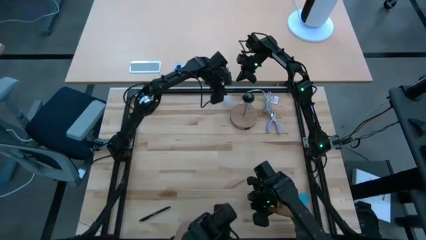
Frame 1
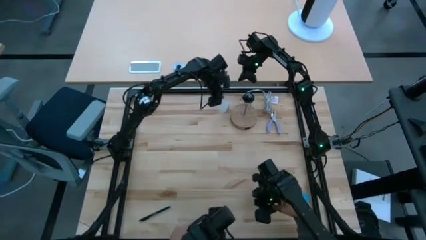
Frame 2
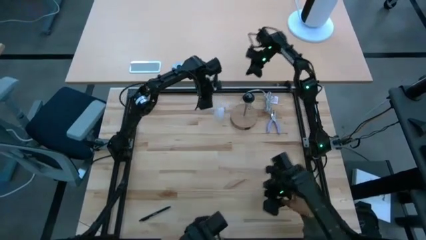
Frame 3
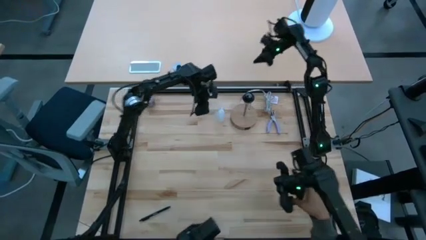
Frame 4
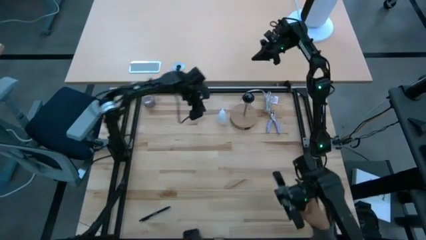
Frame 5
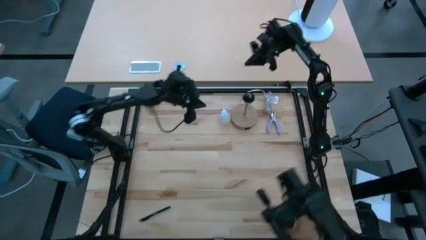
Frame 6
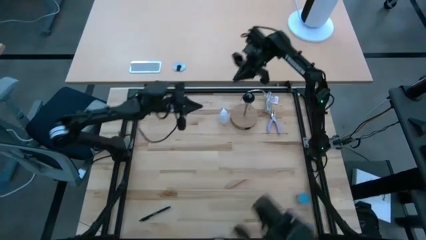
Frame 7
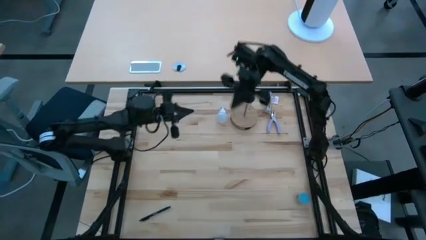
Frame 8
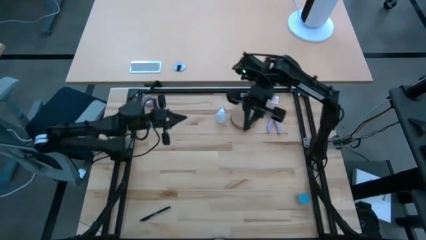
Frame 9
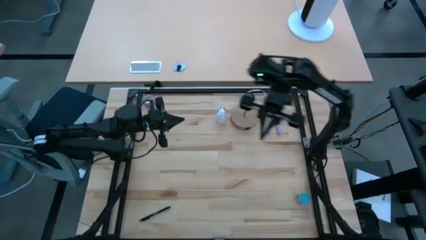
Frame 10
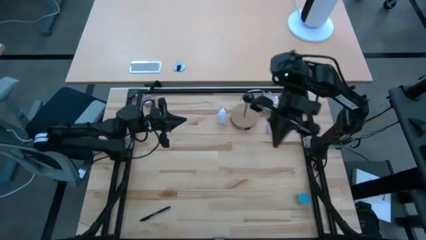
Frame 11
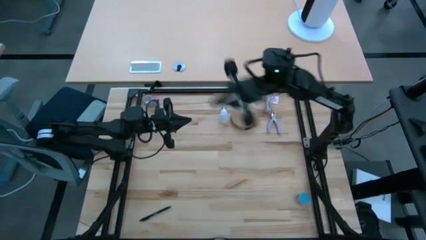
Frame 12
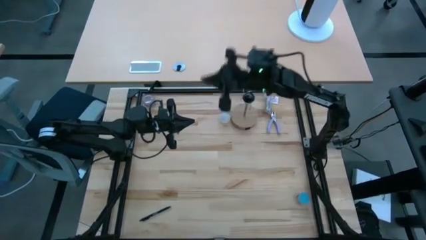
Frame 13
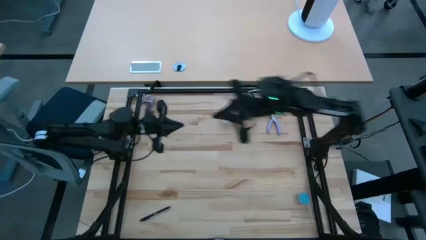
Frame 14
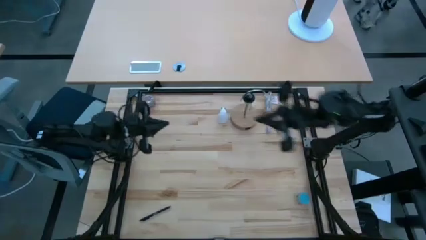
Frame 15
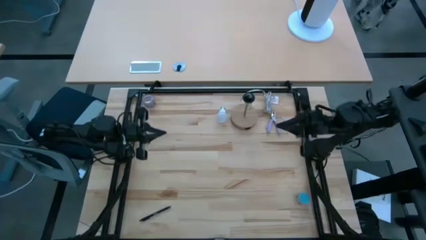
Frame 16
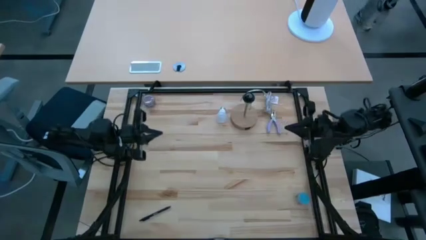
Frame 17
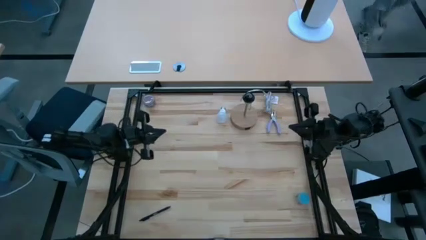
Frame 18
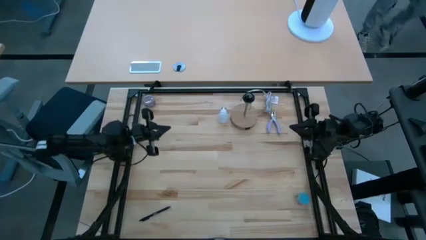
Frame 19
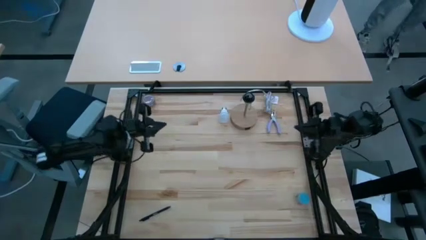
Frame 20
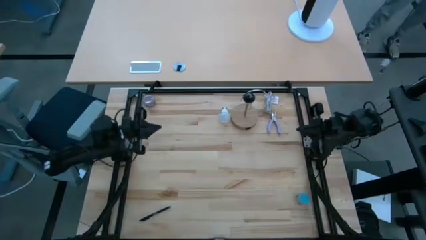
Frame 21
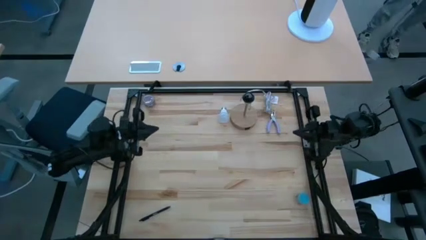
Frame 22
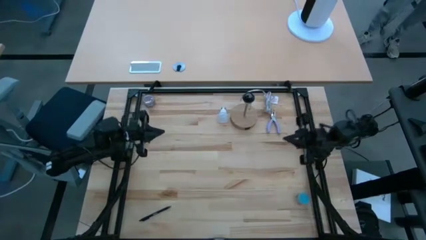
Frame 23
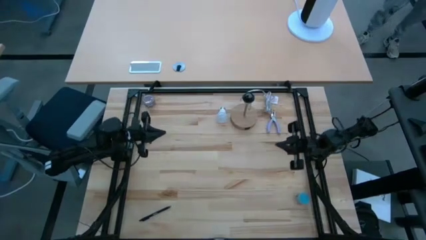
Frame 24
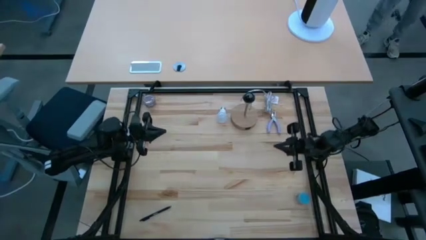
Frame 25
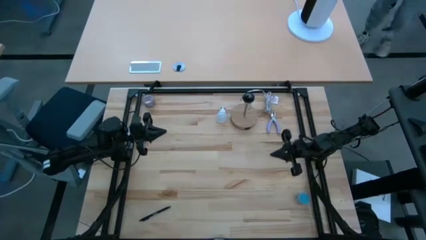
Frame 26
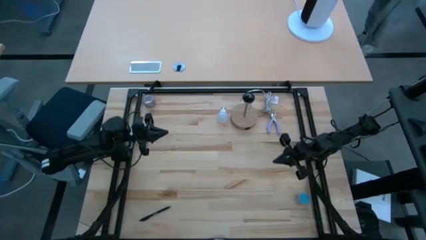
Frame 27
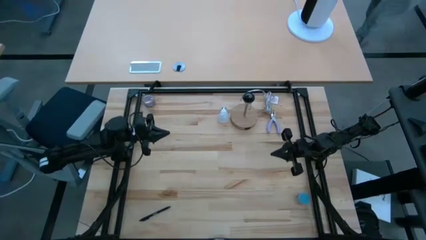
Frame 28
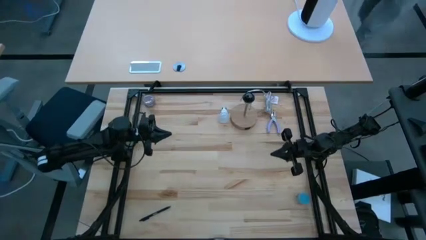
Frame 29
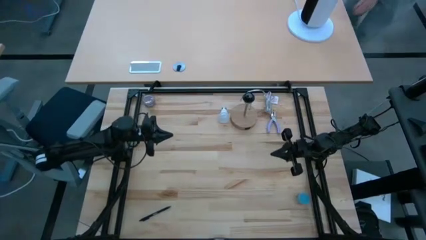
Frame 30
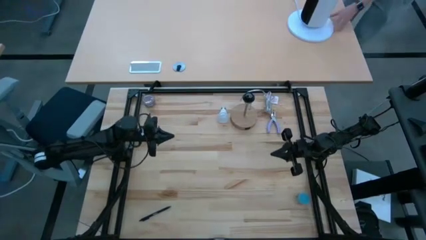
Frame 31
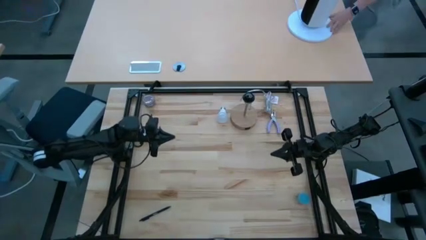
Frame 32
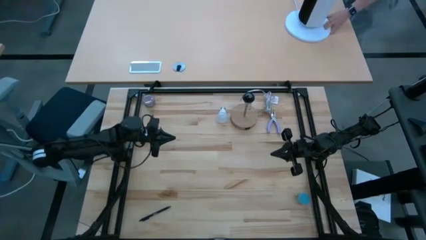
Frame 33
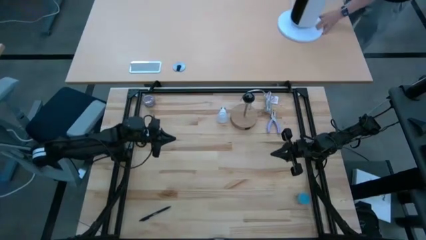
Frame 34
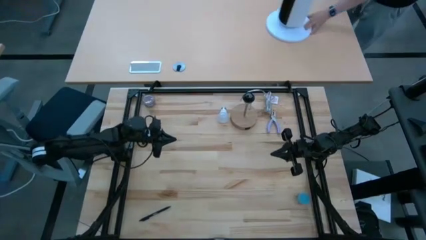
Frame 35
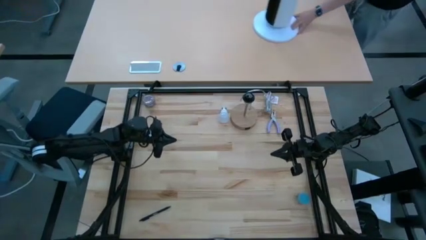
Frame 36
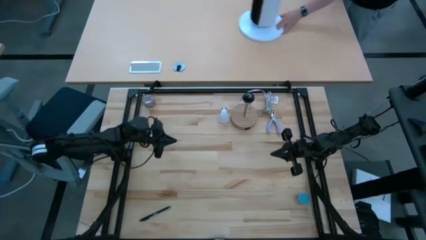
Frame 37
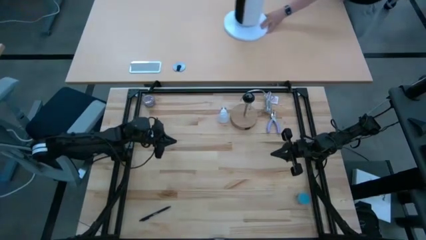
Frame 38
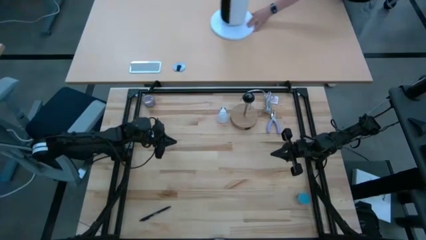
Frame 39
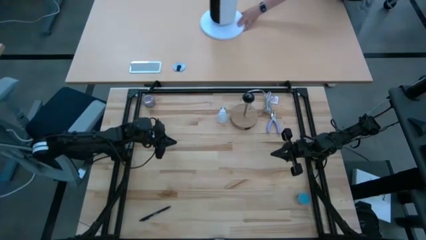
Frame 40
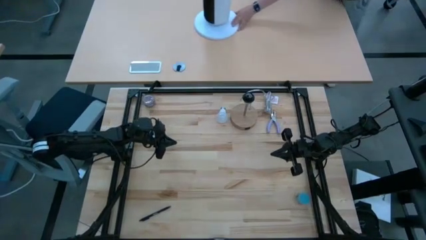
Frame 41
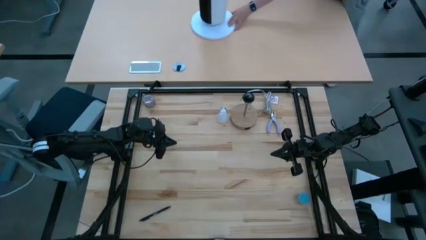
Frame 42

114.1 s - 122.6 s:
Task: Screw lightbulb
Return to Home Position

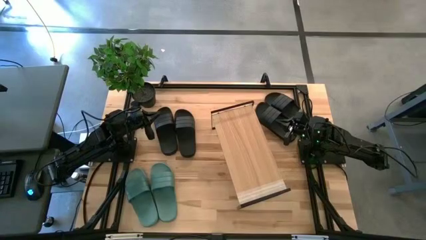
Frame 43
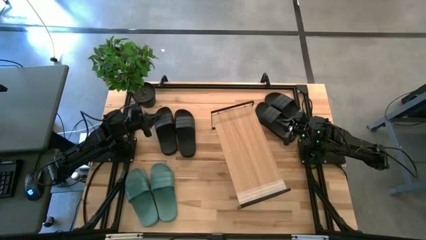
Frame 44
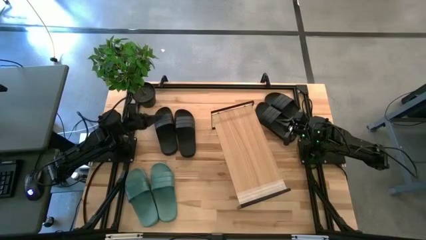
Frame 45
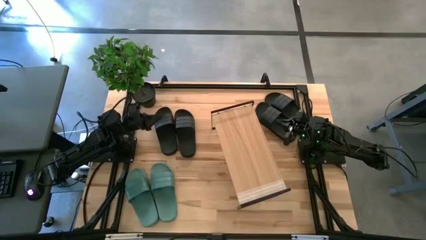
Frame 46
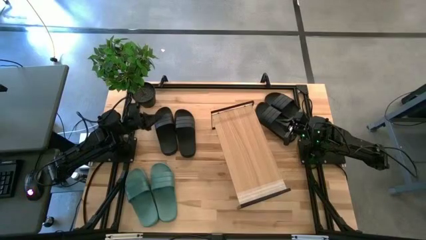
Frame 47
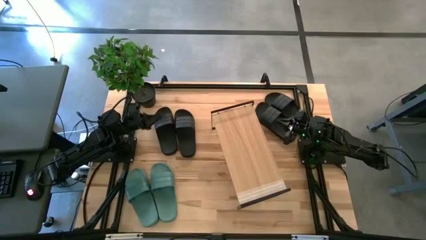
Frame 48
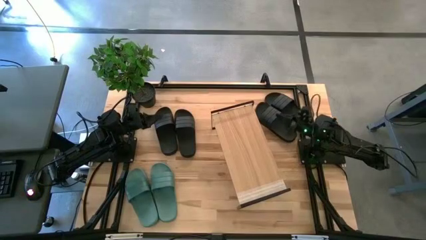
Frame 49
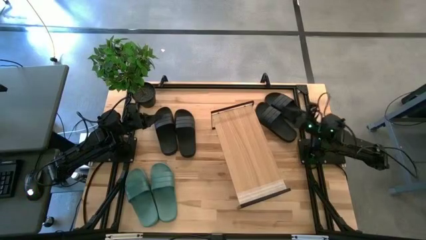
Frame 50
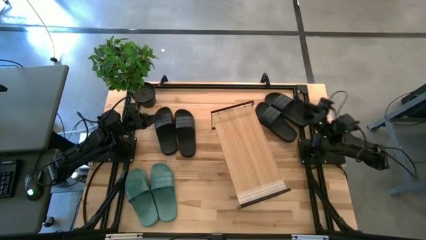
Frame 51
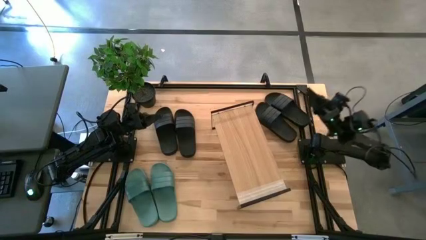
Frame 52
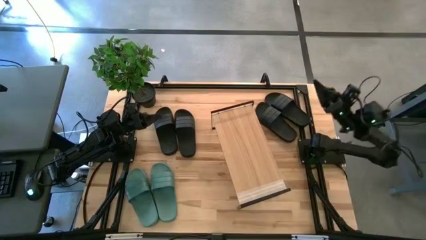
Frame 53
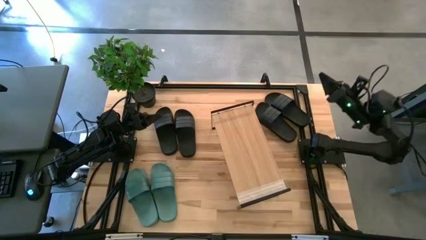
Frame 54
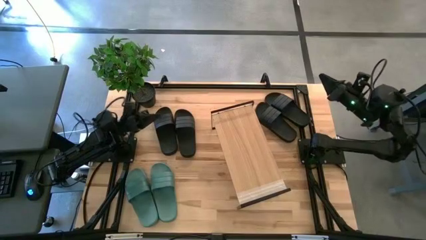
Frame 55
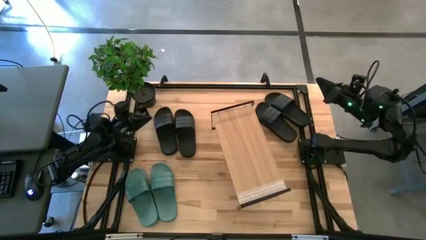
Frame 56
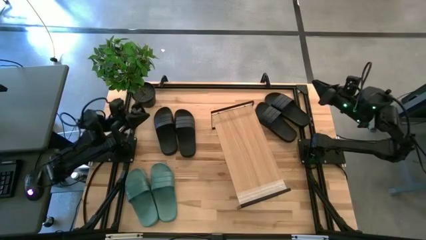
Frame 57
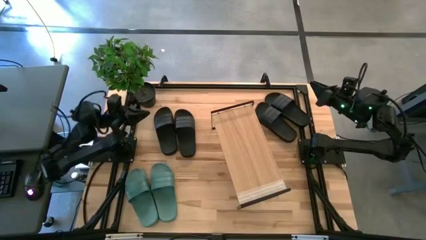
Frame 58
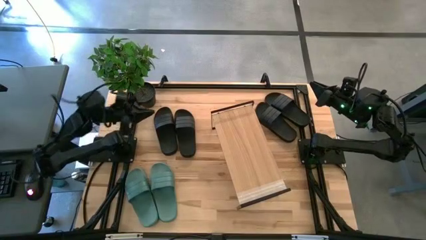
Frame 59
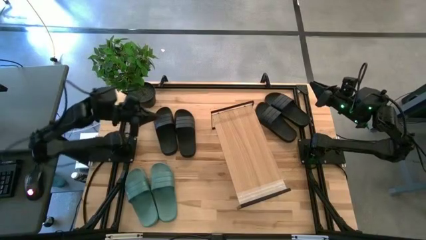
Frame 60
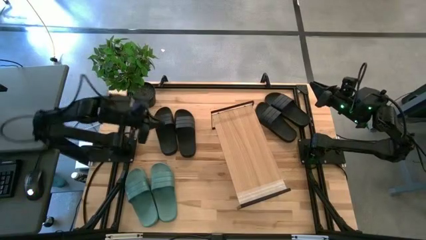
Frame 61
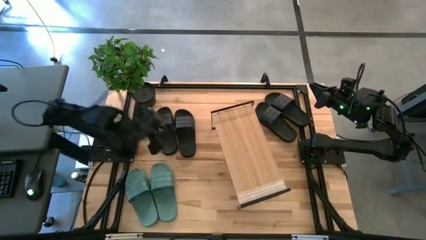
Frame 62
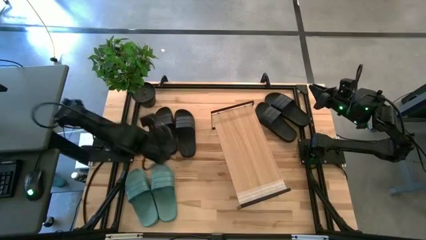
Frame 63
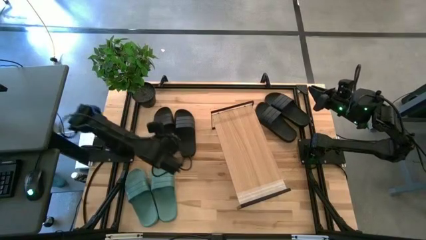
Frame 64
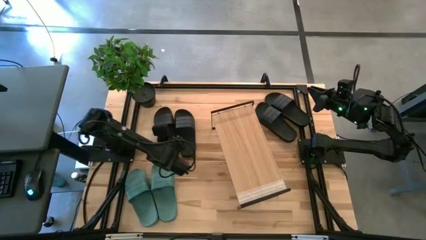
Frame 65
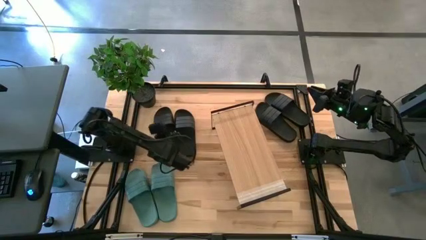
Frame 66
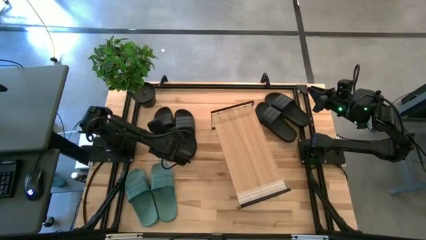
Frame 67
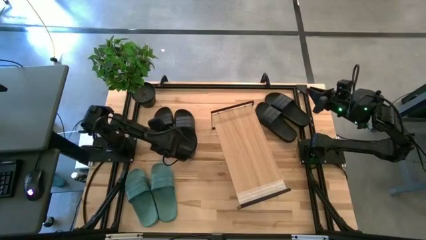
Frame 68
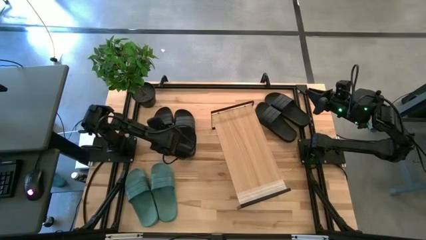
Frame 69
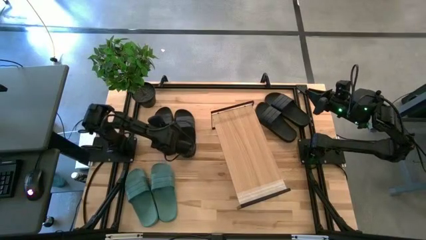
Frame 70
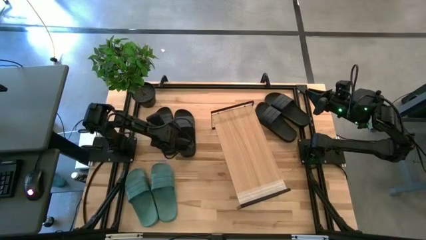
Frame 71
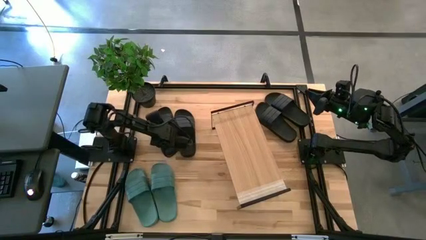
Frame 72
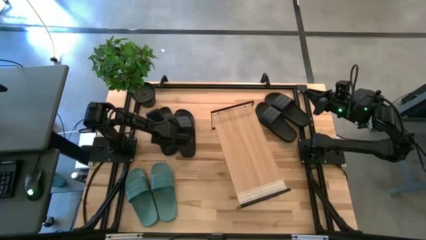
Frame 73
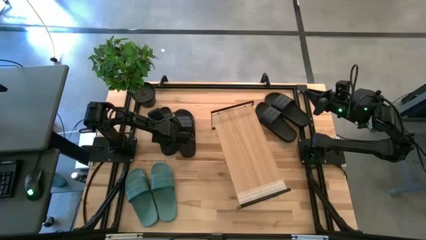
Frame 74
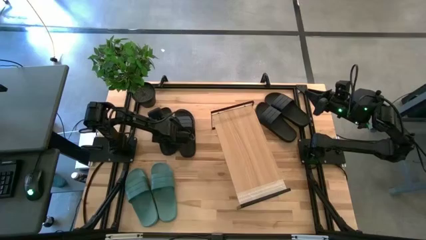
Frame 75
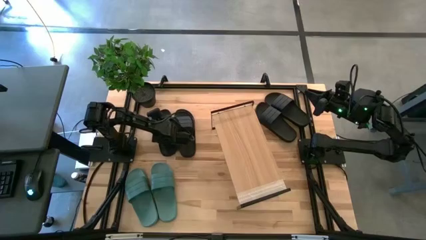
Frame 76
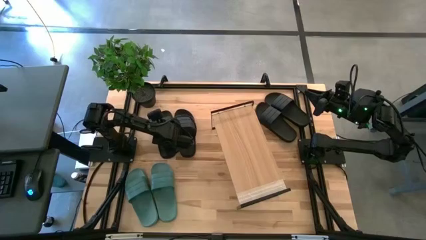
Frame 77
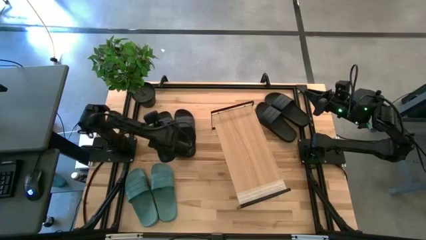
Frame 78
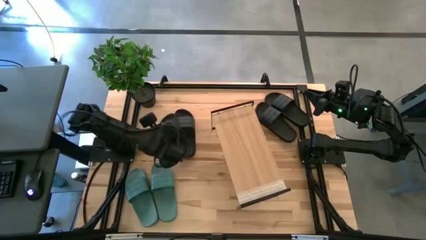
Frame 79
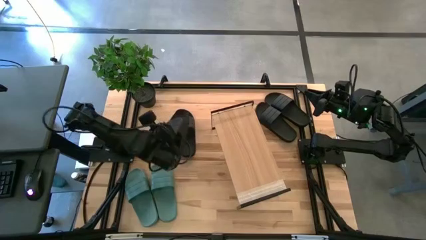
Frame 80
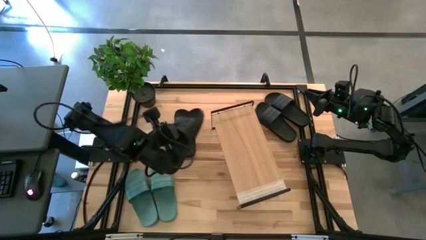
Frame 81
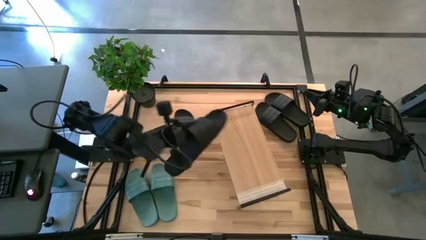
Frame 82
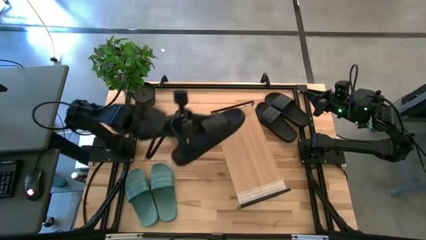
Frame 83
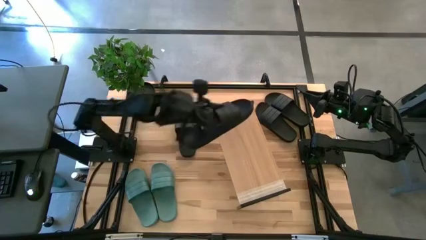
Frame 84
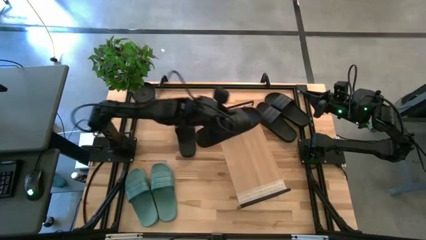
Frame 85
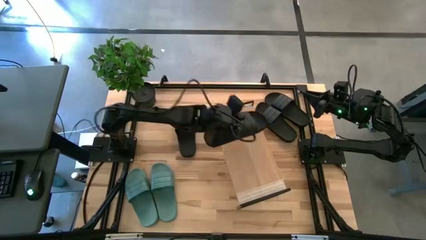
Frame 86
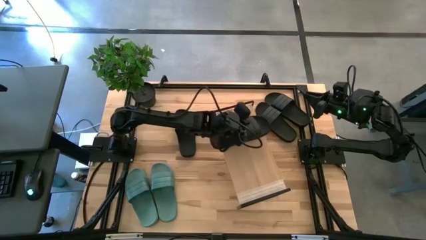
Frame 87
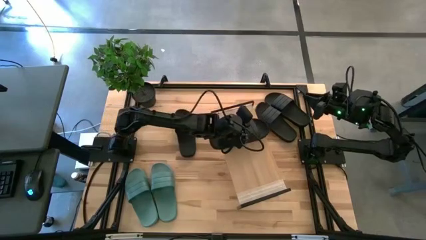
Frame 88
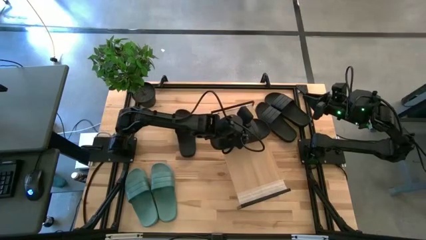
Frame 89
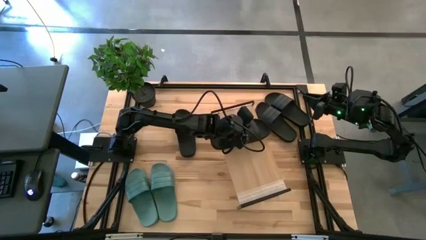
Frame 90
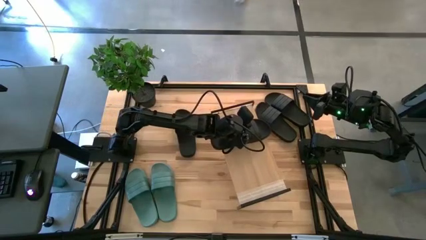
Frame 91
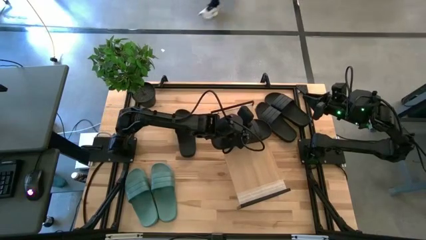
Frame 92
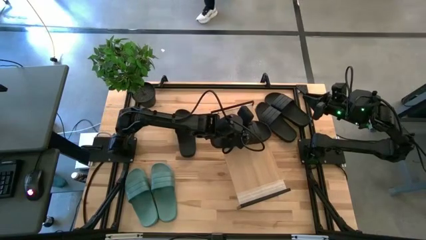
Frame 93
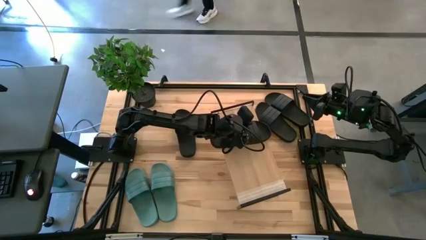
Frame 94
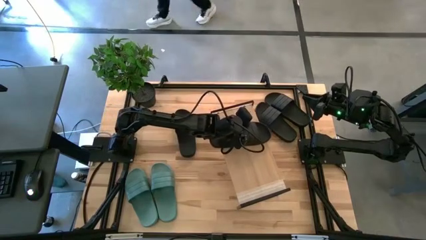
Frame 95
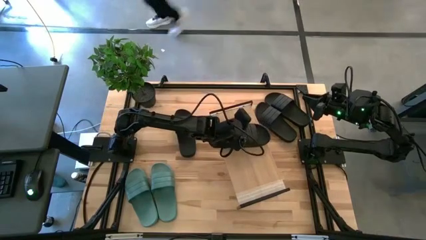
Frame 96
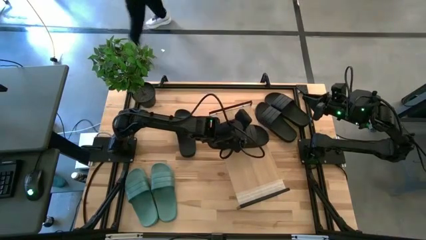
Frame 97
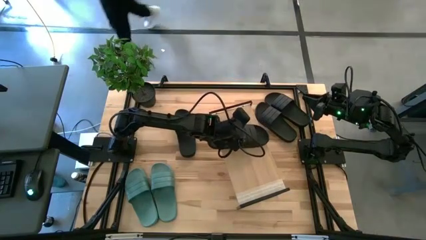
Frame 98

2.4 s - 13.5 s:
Task: Pick and place slides into the shelf
Put the black slides on the shelf
